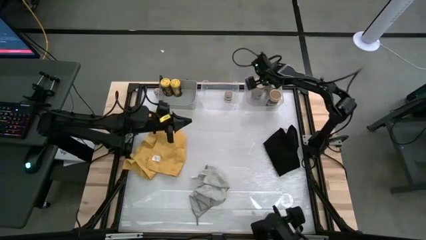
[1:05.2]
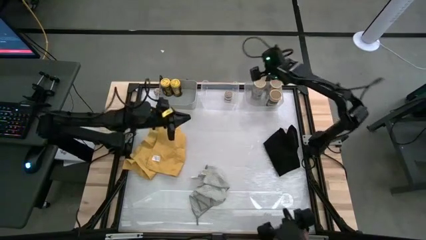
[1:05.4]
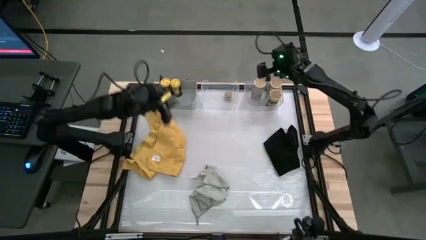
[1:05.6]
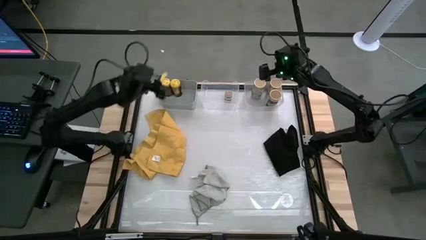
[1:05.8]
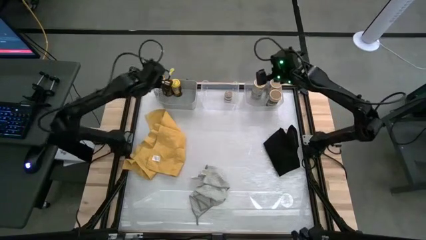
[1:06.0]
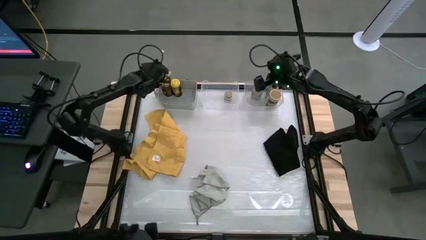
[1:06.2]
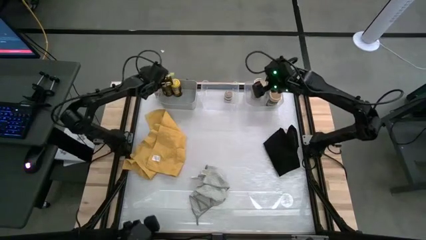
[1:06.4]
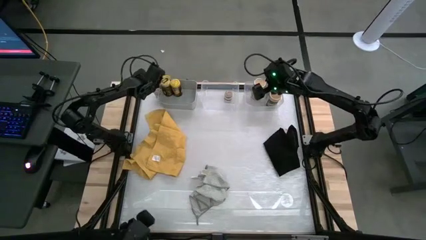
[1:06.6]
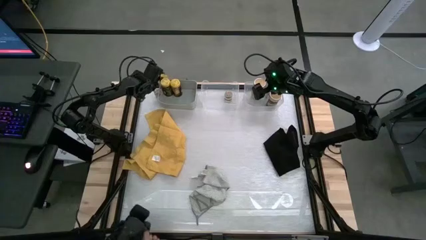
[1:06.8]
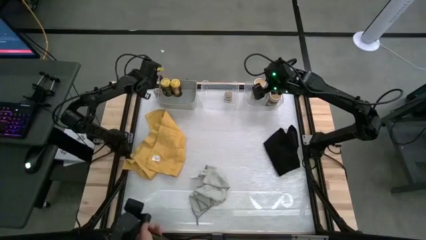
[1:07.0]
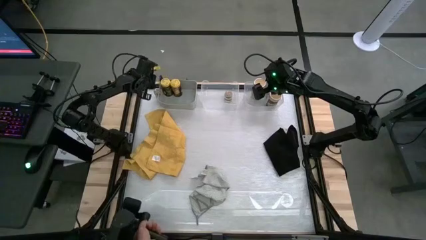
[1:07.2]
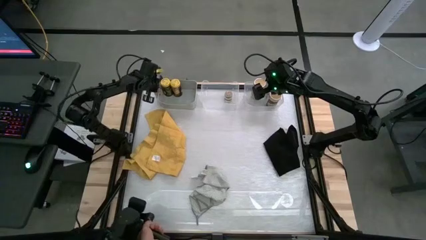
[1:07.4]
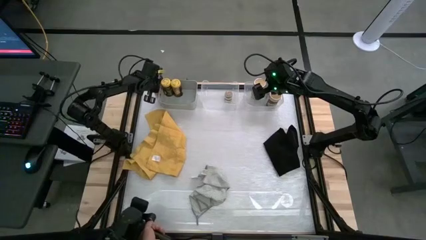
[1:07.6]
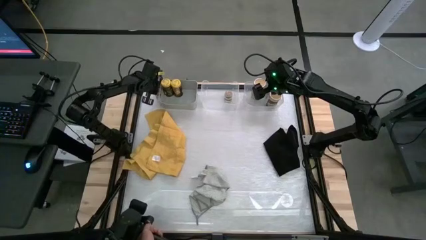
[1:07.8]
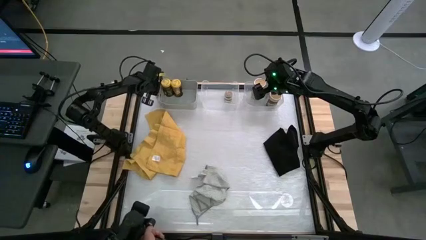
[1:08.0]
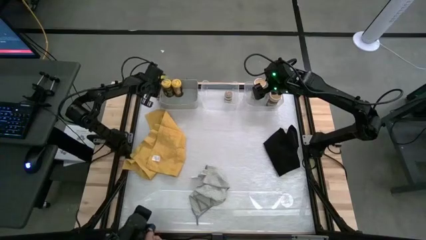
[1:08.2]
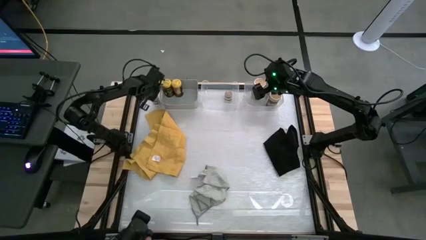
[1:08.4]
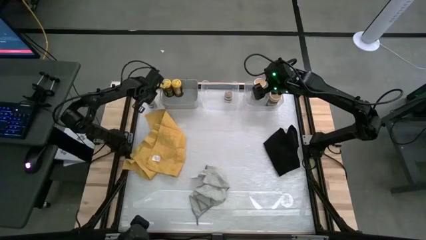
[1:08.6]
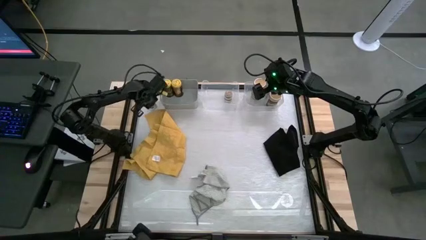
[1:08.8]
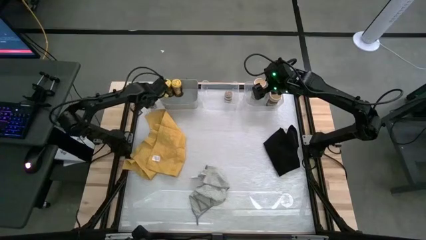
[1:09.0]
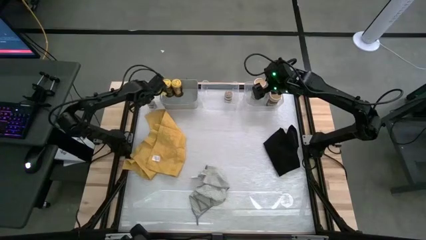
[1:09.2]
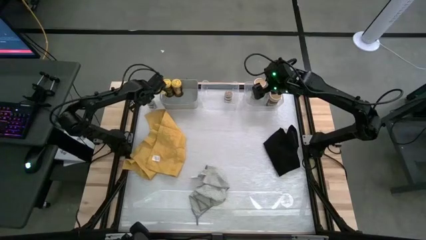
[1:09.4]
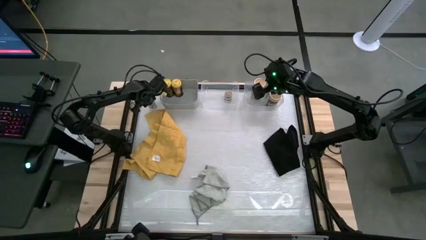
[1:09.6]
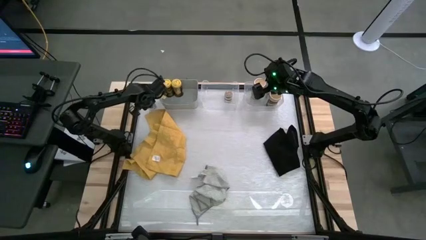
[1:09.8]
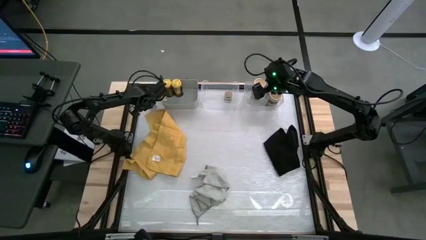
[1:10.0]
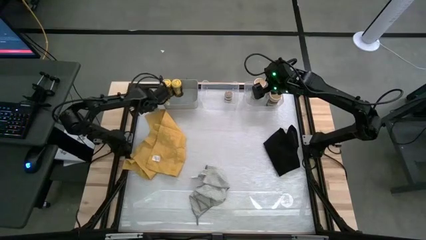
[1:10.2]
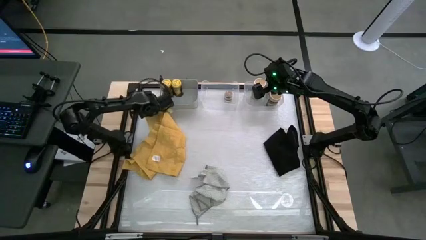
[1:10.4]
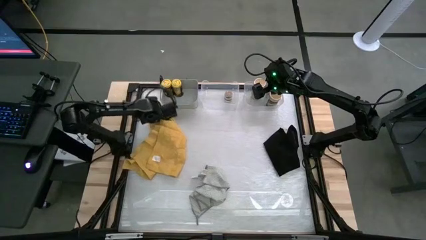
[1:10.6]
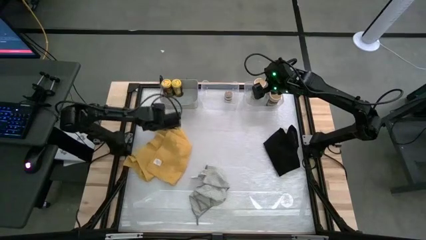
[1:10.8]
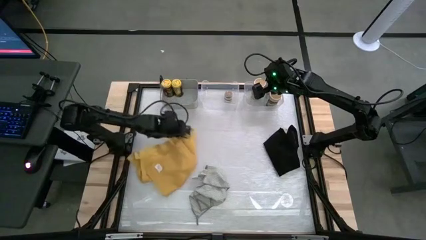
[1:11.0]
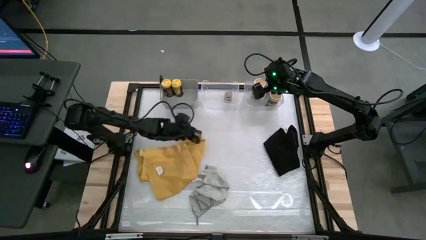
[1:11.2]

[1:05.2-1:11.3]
Task: Sort spices by type
Put the transparent bottle into the left transparent bin

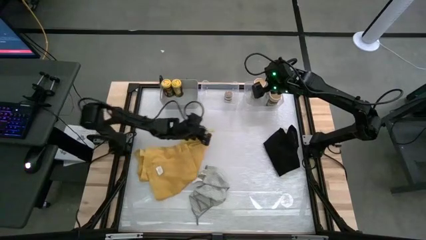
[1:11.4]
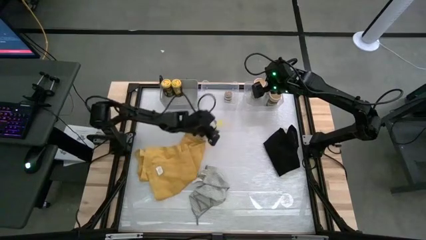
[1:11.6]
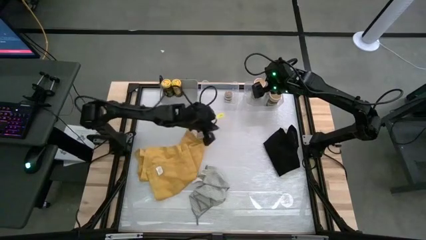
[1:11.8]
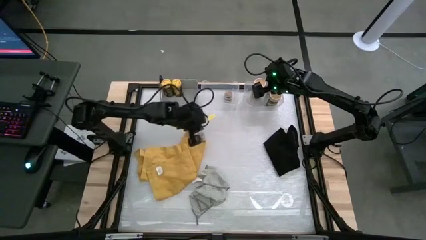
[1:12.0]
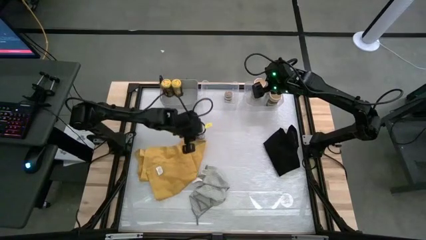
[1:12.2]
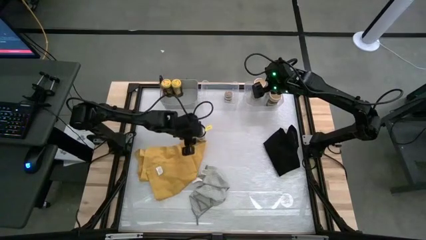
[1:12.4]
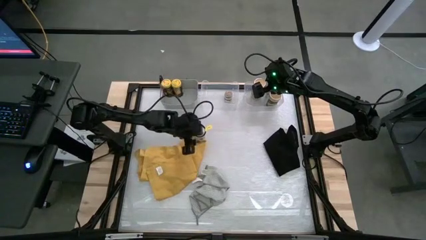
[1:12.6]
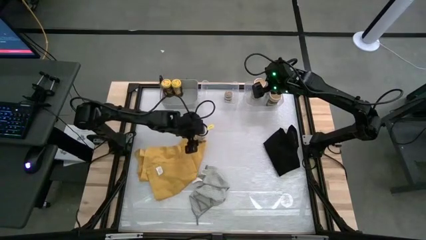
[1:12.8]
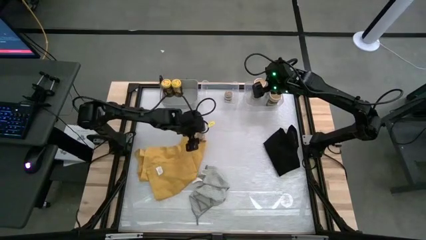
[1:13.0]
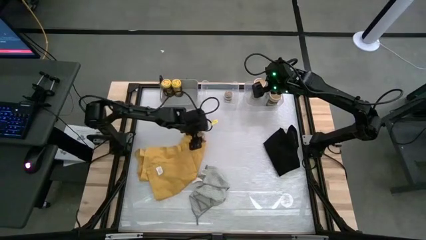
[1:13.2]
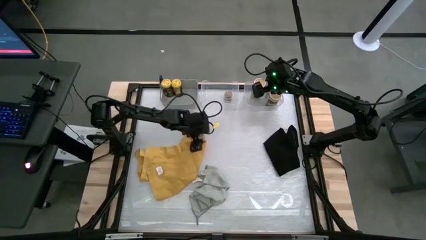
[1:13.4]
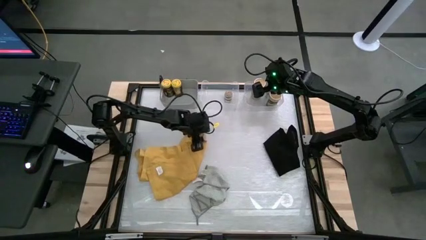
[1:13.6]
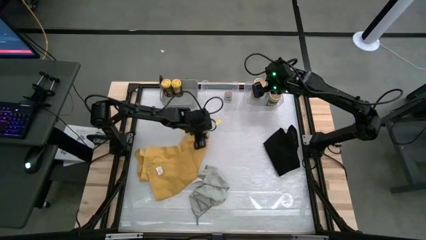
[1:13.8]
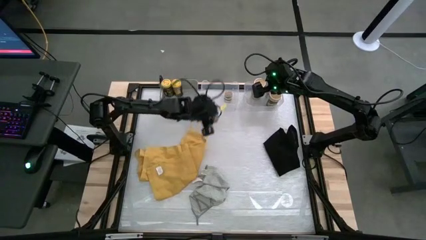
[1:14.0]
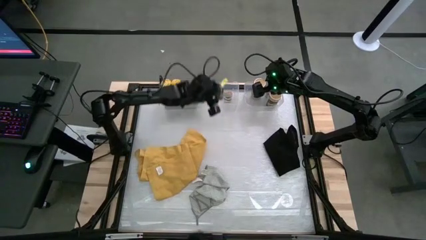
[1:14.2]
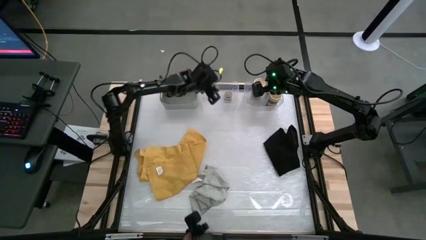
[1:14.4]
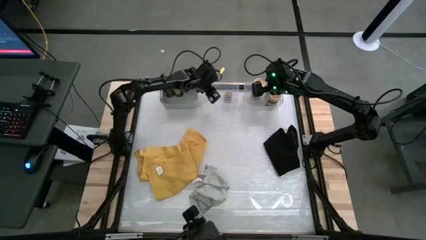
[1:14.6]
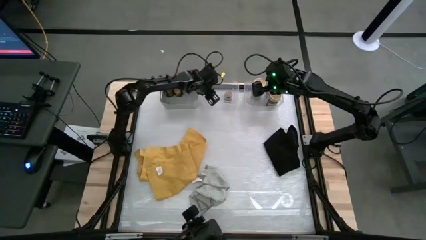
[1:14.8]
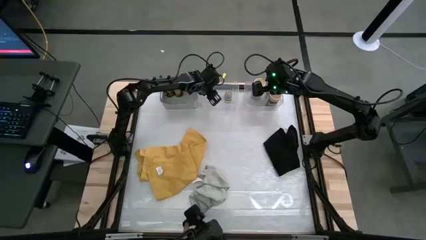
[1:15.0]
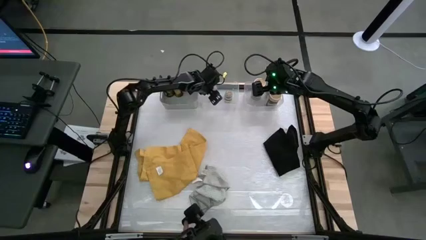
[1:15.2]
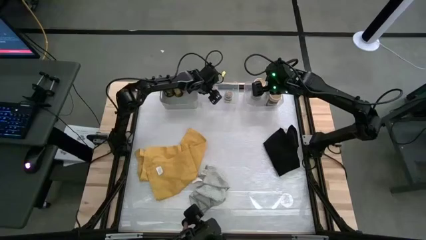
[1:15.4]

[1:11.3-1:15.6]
Put the transparent bottle into the left transparent bin

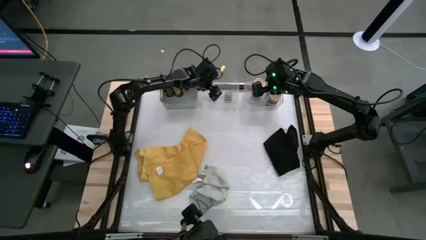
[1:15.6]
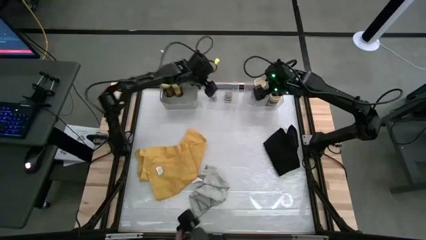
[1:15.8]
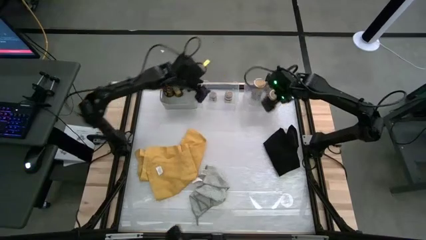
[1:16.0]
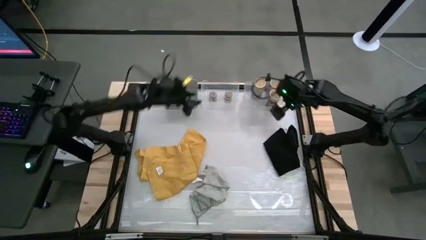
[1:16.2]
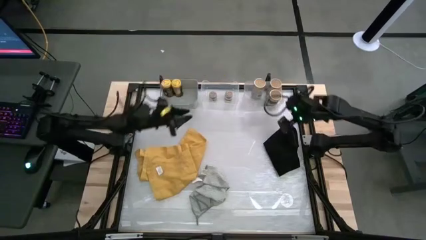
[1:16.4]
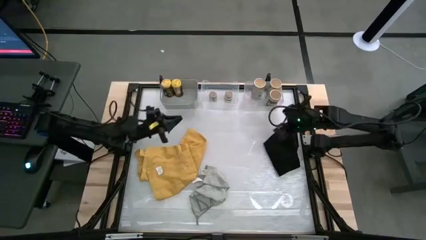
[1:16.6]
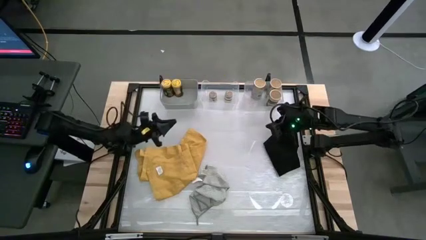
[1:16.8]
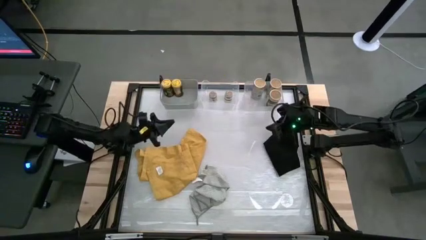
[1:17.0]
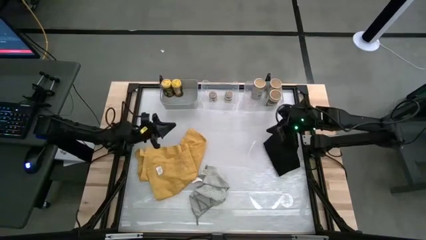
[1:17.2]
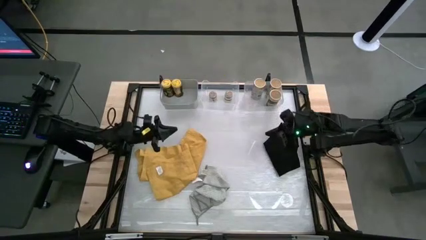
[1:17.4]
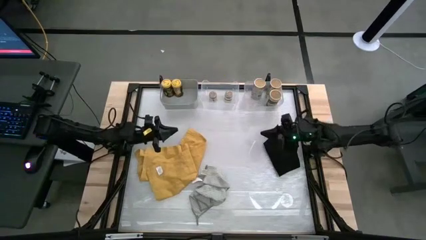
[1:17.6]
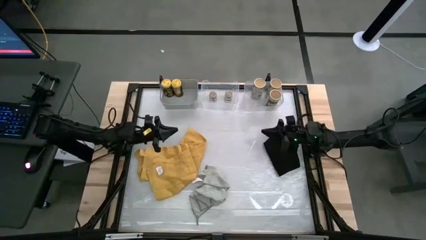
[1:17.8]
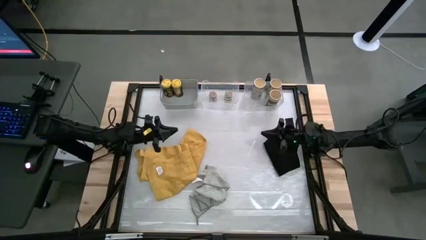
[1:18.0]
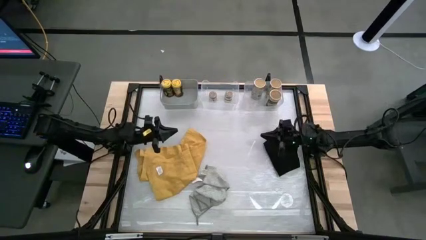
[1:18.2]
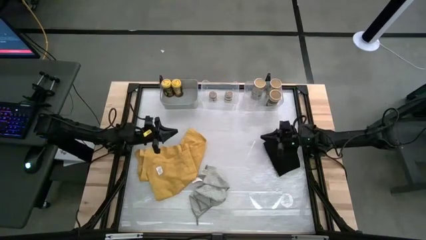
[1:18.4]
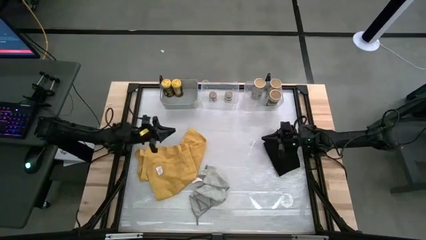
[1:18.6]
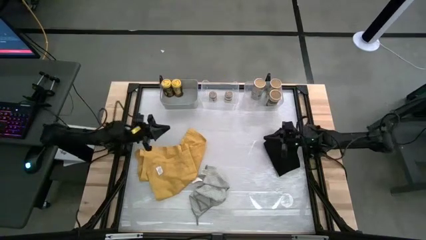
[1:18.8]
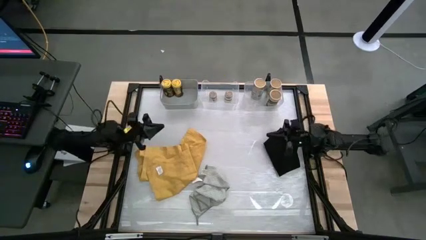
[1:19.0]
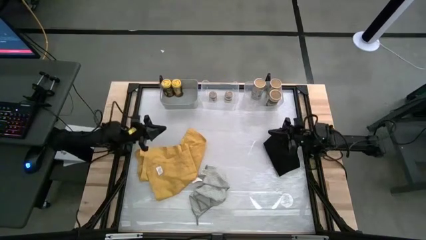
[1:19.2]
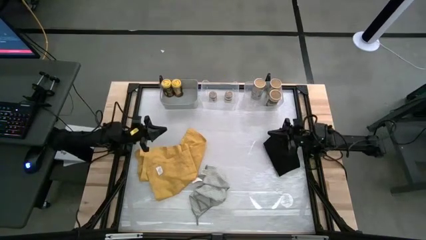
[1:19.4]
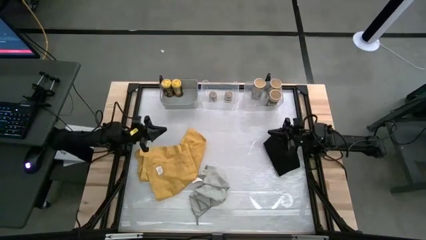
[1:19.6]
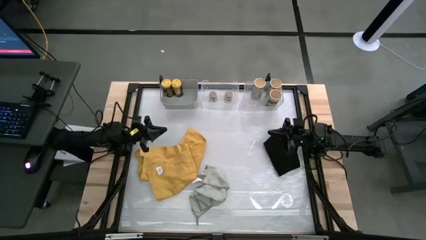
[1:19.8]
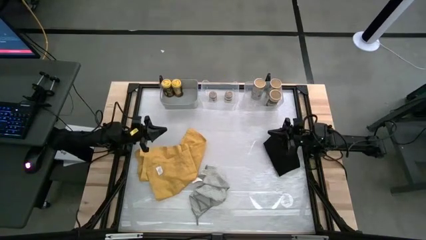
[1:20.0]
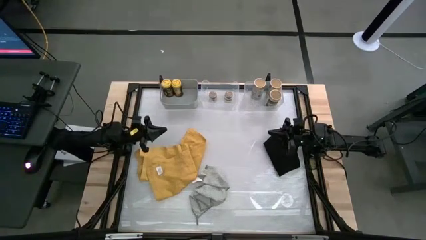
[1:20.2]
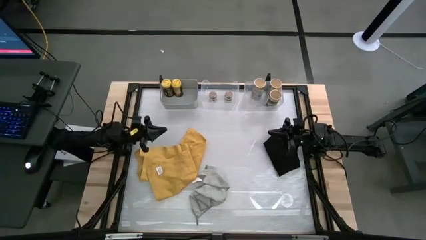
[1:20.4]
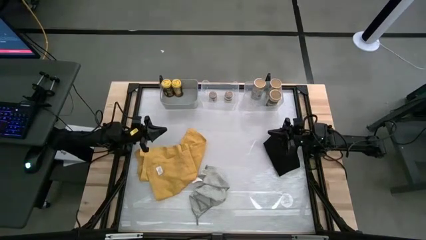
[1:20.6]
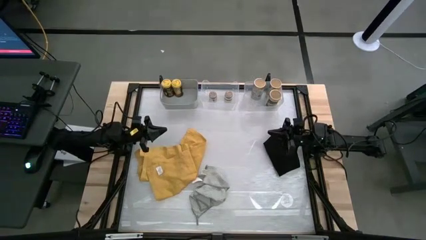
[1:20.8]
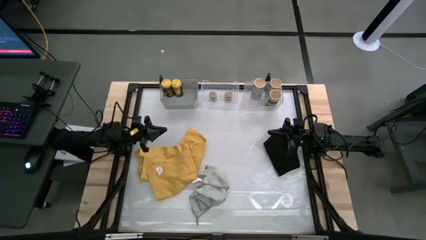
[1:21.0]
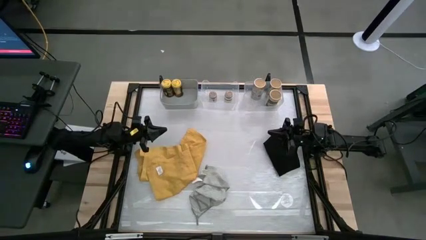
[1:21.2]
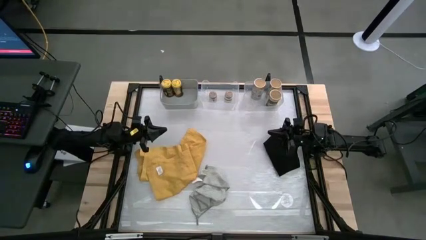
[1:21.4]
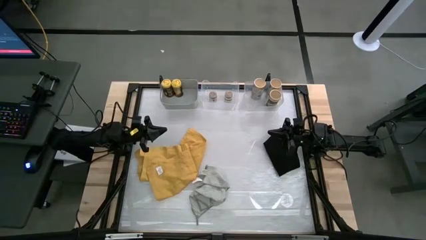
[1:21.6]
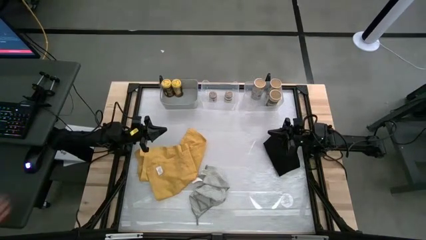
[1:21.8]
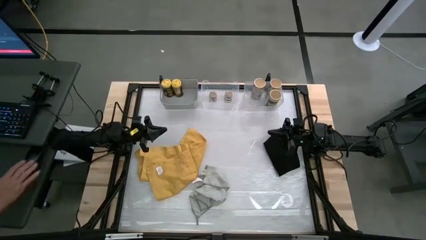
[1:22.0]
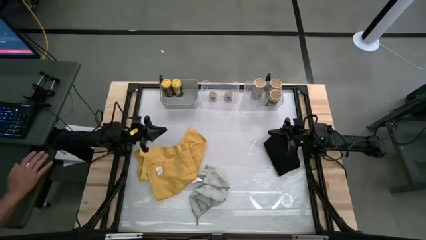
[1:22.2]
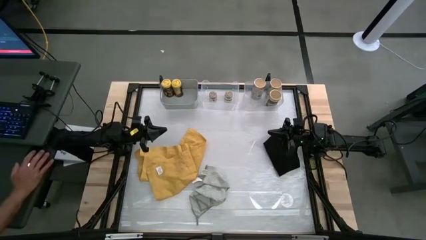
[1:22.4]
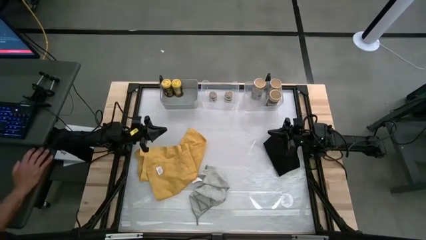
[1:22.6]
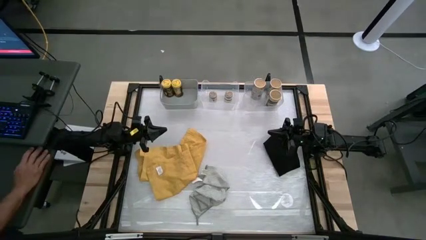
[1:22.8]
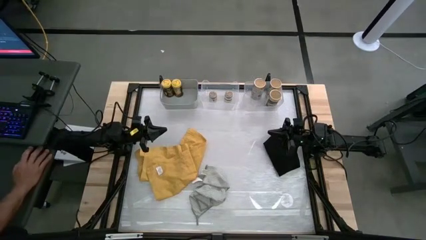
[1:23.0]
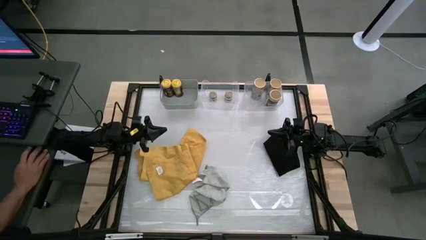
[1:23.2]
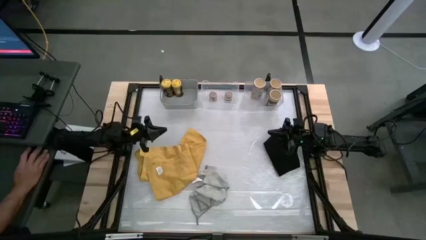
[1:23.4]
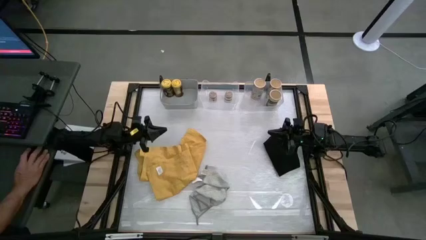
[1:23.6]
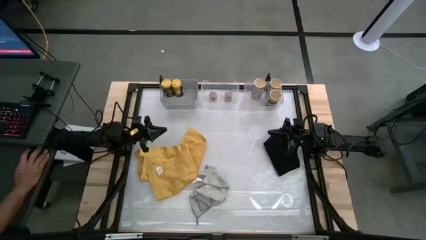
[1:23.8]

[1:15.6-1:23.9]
Return to Home Position
